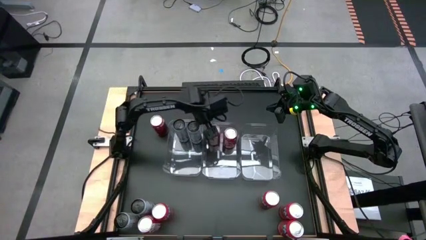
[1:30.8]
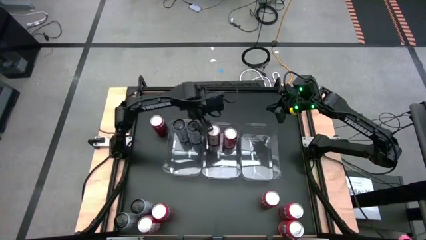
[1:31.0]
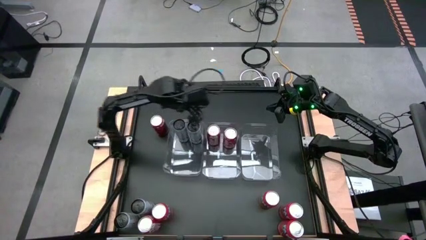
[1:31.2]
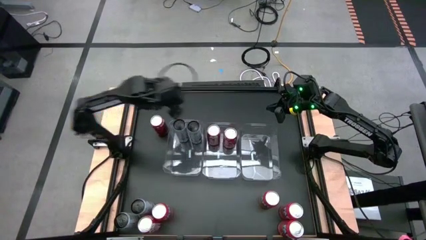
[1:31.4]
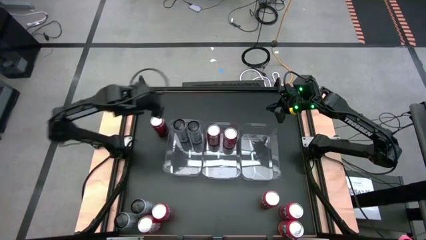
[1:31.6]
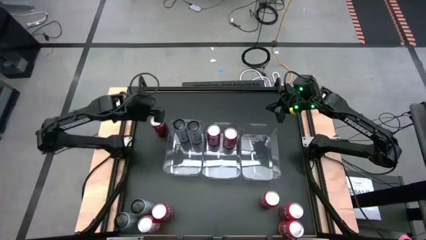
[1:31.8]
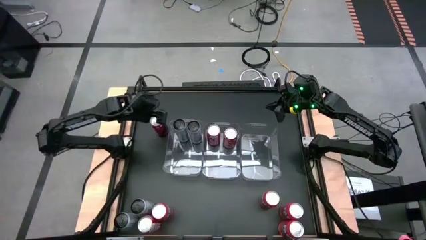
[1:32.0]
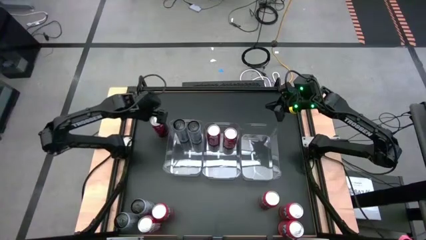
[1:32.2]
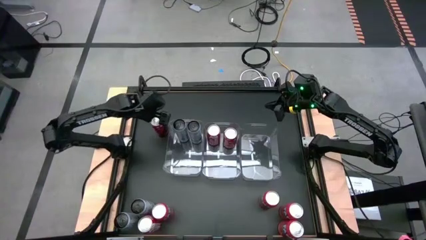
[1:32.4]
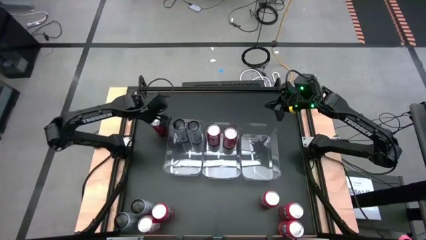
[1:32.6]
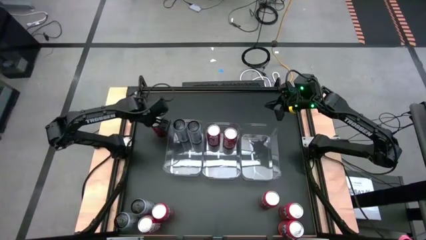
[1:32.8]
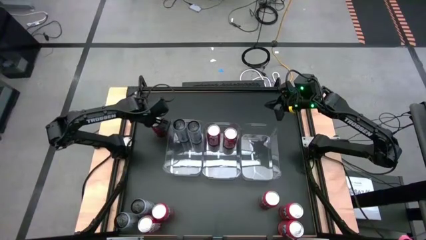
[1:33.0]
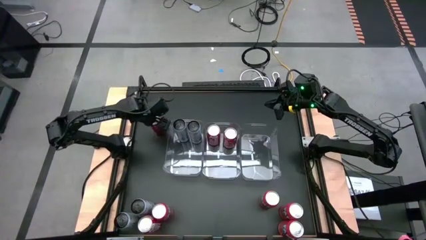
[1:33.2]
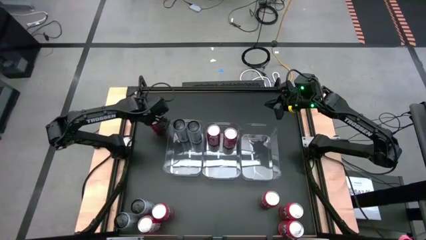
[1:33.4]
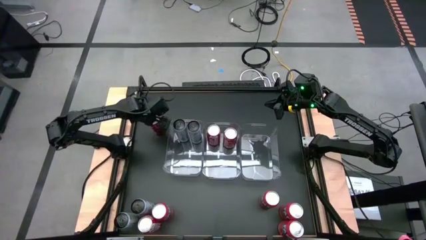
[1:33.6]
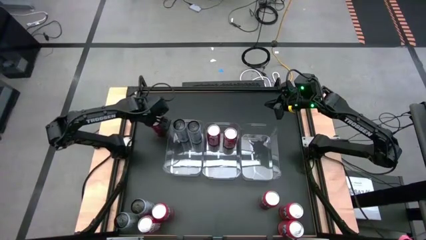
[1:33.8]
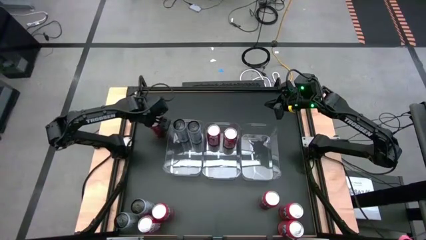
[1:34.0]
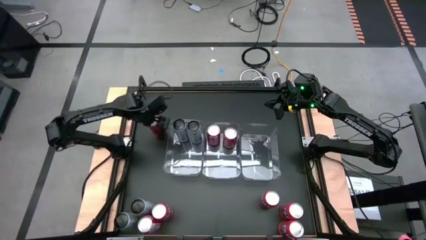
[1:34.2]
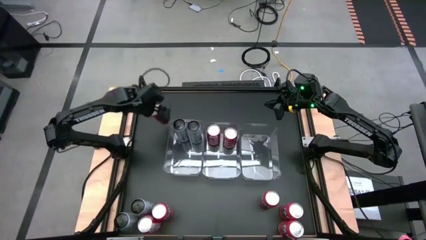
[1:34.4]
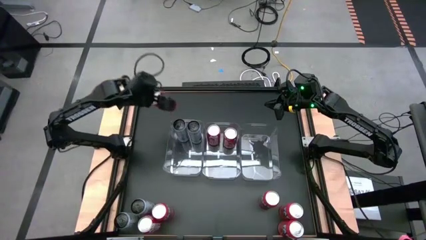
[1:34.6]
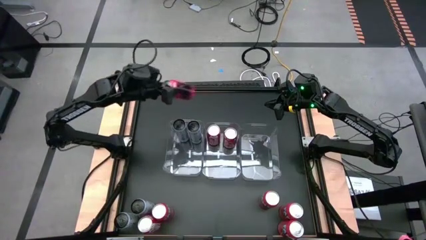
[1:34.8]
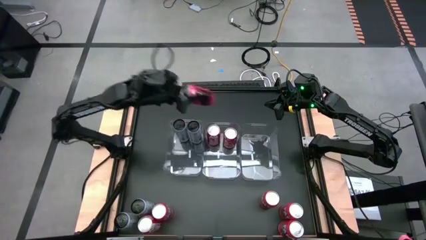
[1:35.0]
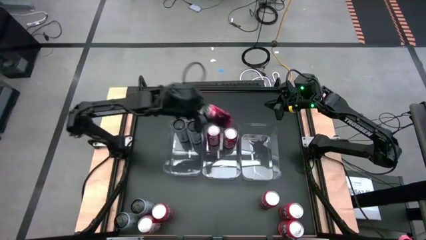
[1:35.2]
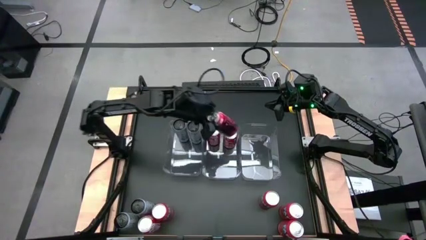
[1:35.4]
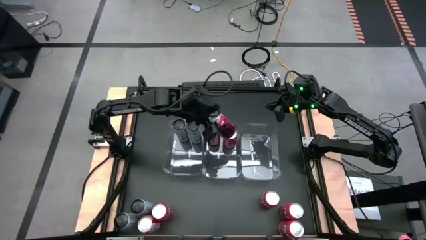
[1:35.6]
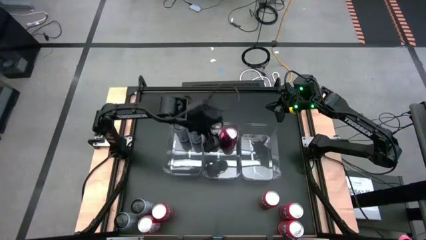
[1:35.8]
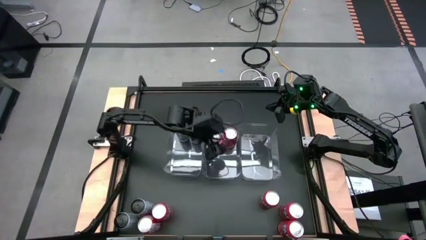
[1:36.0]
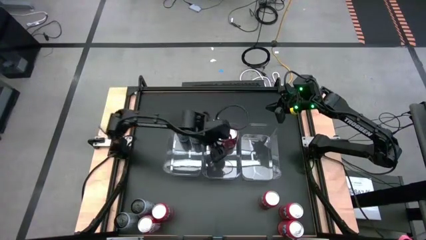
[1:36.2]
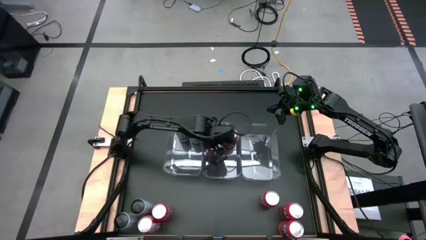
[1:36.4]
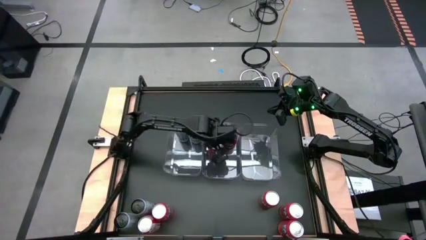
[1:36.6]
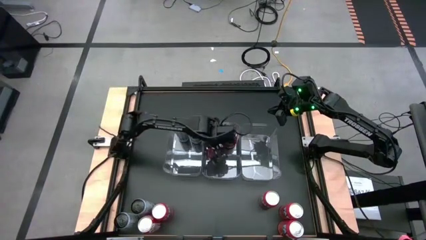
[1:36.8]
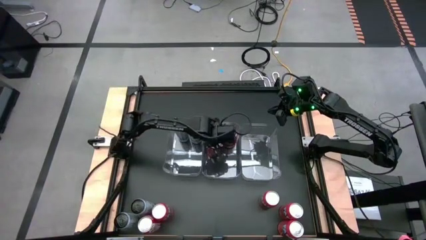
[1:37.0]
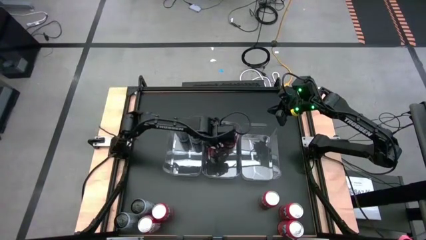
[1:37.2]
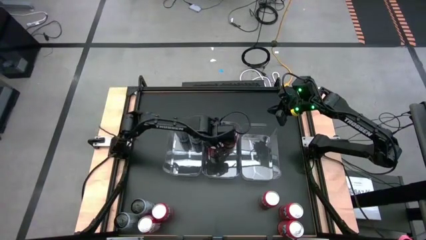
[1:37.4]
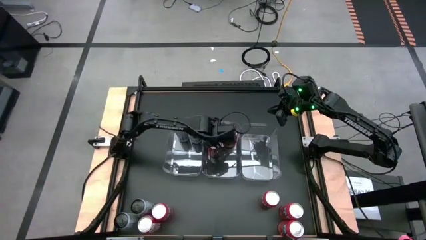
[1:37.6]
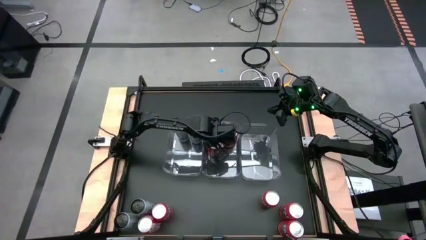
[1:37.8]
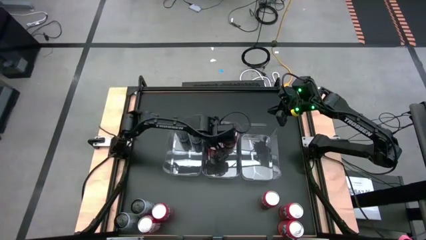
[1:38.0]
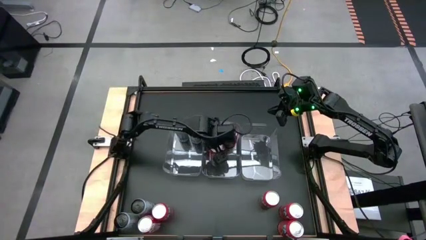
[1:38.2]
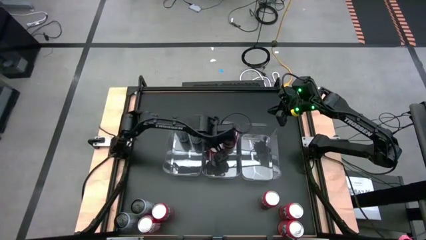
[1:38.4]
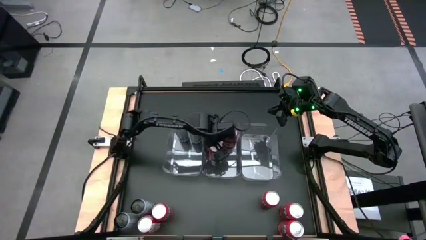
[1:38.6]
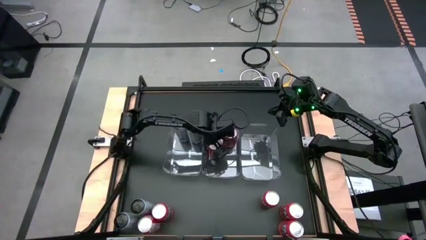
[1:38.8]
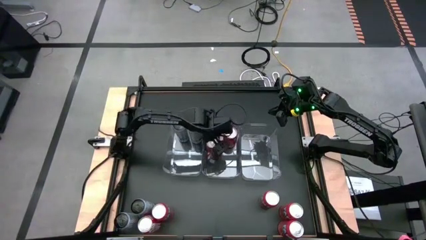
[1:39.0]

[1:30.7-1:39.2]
Task: Sort soda cans
Put the red-white soda can into the center transparent bin

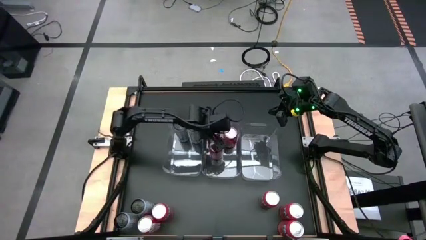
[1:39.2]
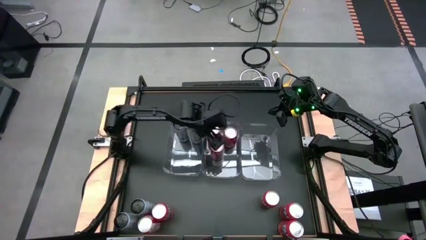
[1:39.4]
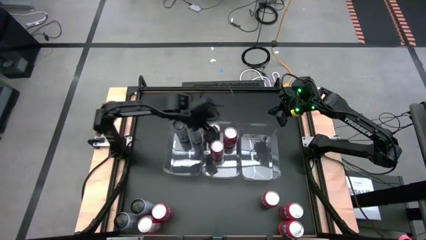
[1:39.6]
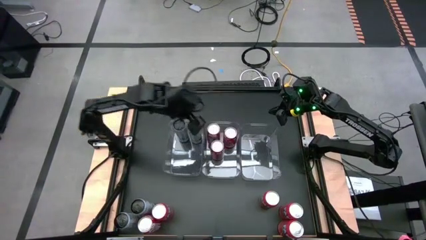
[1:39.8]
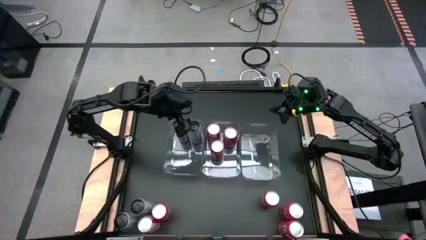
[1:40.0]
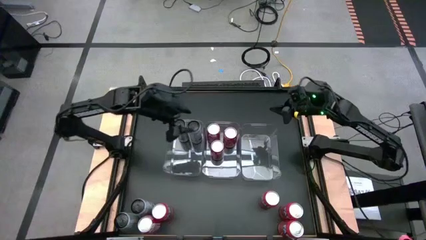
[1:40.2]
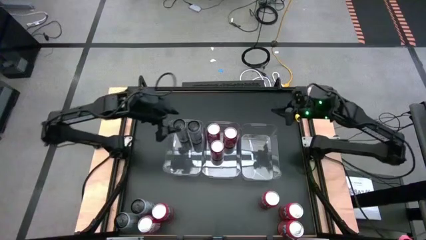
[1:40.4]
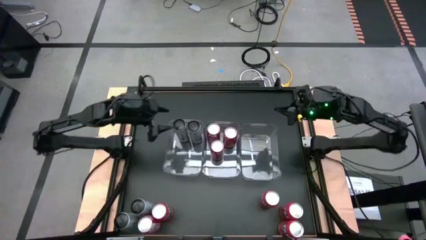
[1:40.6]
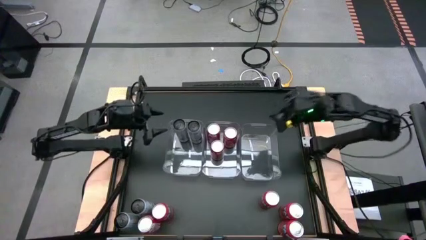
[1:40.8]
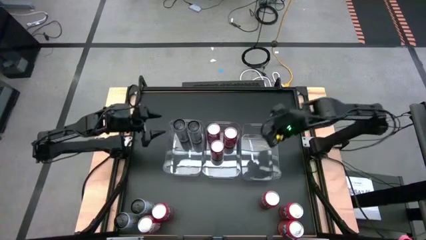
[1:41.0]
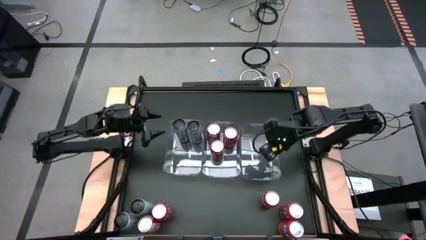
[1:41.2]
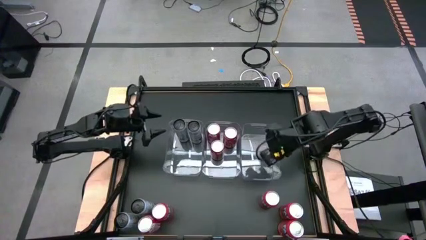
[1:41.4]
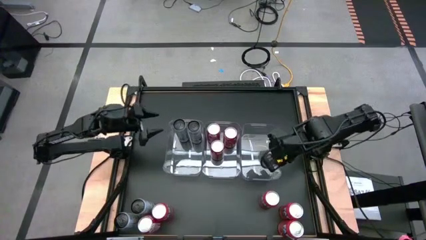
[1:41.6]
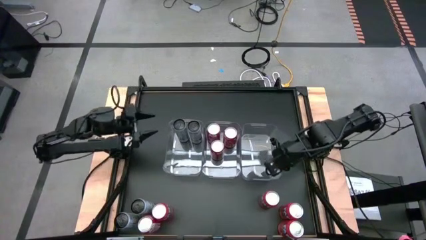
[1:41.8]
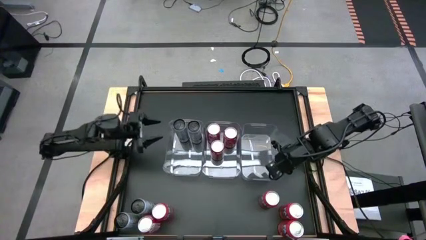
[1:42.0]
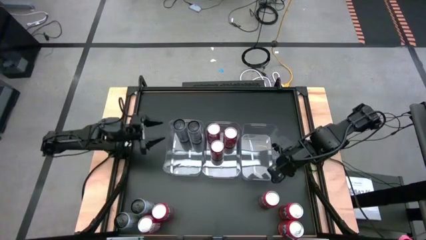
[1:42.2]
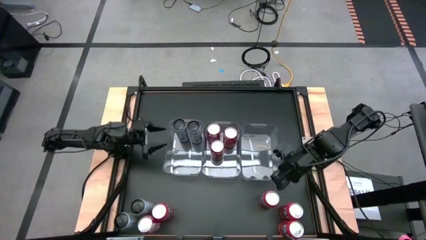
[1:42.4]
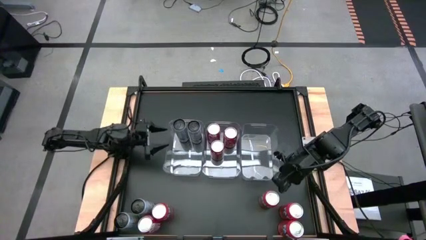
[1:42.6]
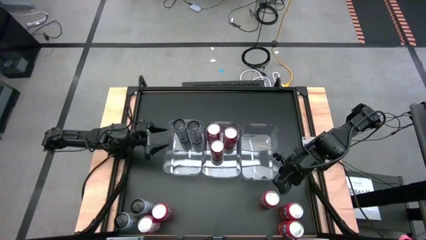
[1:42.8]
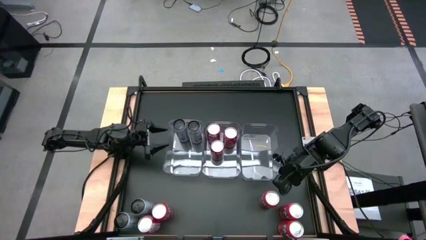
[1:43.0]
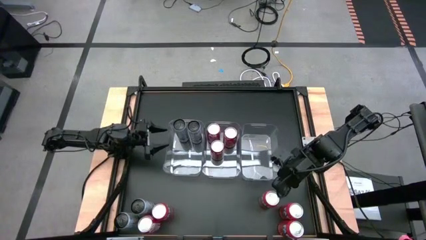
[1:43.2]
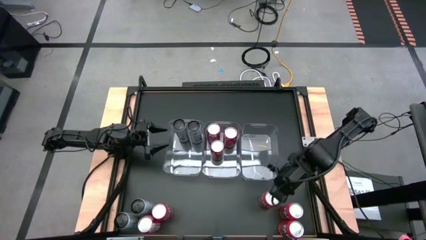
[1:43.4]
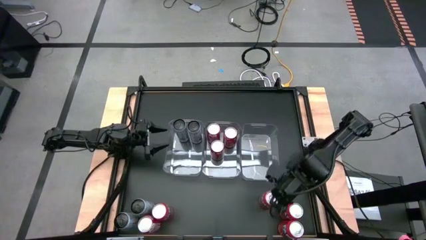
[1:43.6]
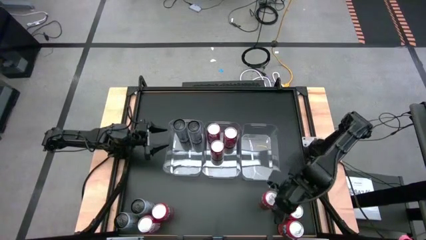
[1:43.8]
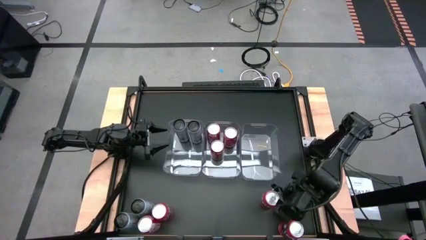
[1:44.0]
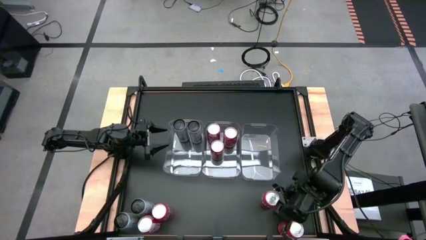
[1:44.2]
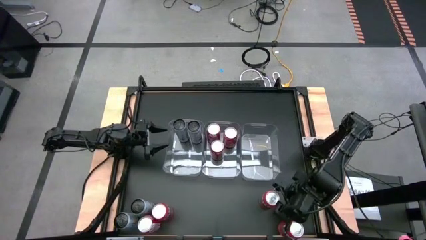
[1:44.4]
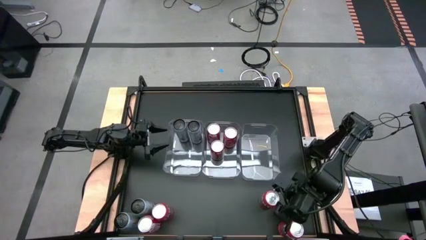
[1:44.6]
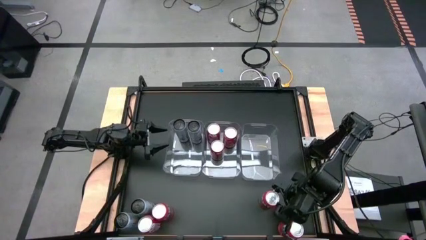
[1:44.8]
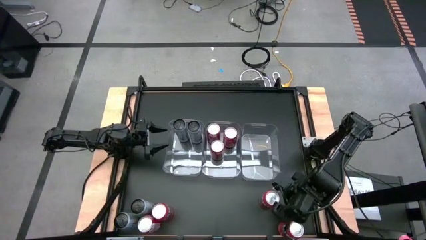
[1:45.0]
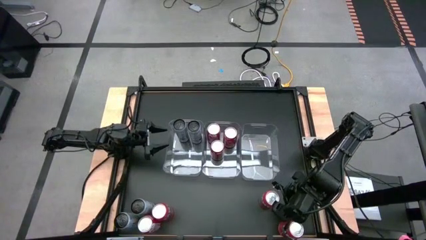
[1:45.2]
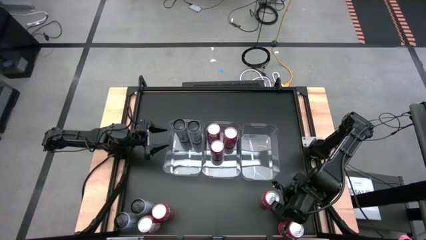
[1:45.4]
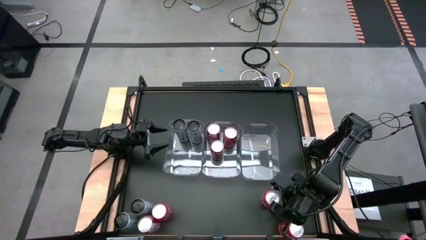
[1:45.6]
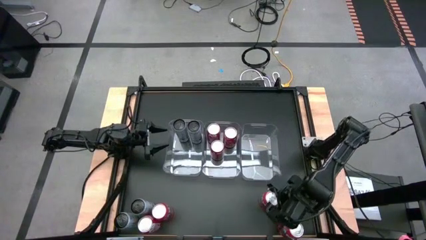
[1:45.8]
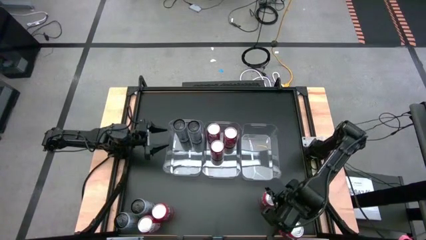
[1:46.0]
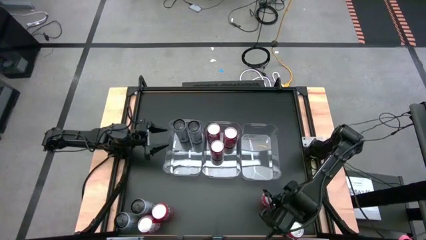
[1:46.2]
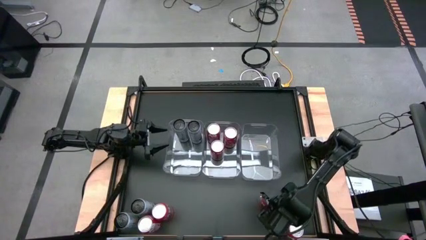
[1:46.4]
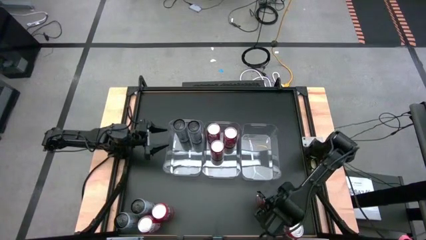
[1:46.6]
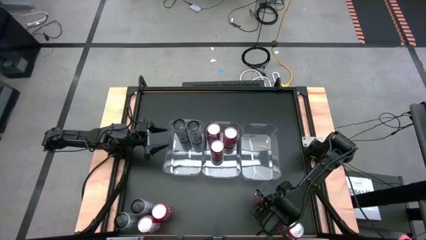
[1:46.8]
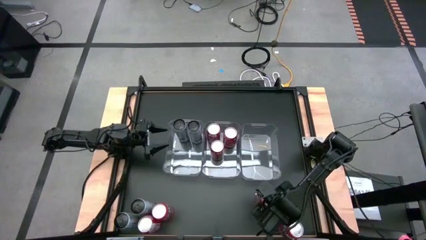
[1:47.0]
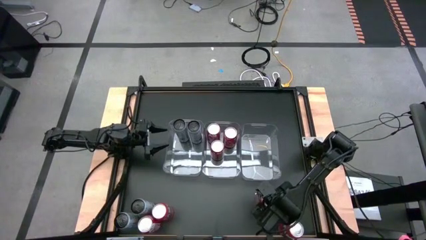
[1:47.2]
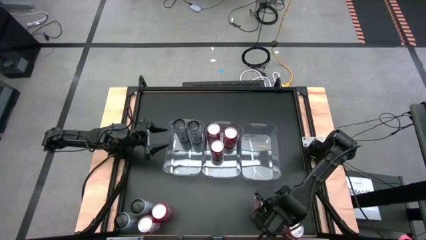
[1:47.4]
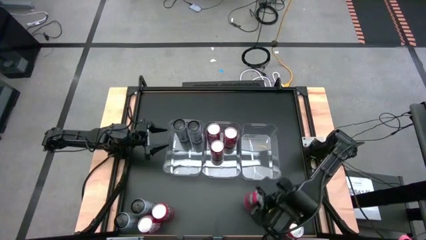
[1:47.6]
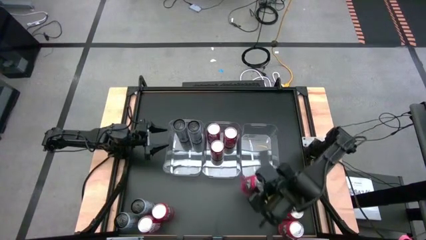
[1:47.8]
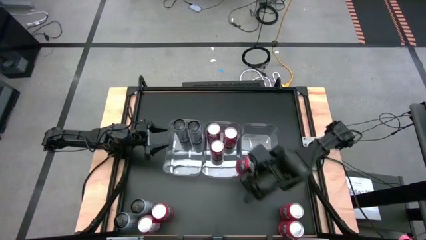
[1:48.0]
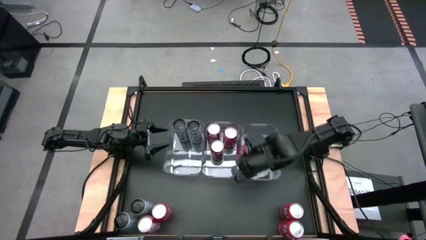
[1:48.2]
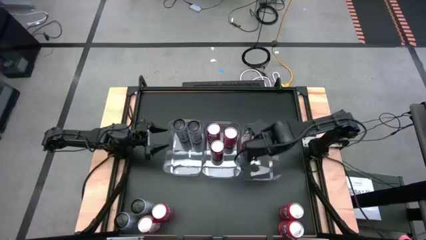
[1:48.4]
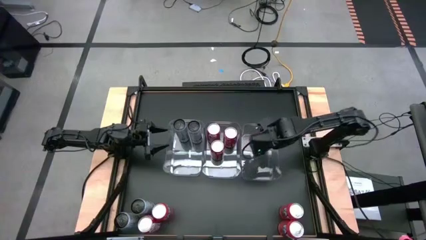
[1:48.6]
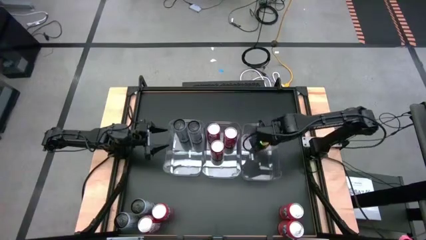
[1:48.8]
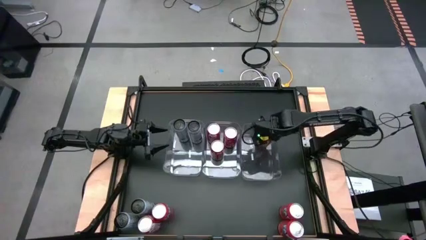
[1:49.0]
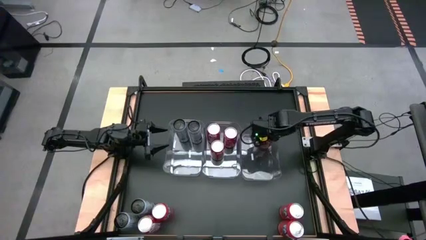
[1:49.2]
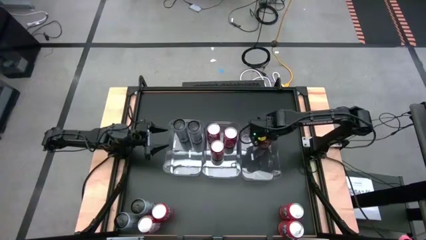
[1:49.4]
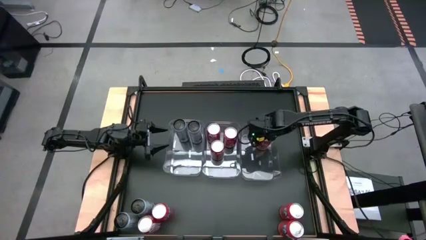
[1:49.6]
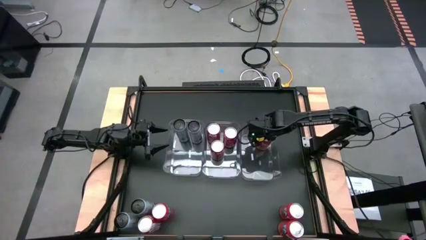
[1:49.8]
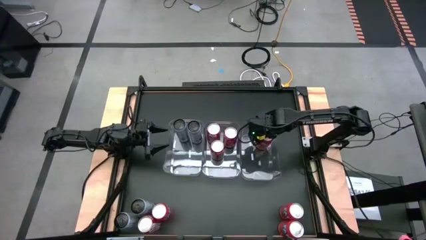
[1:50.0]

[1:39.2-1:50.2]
Put the red soda can into the right transparent bin
